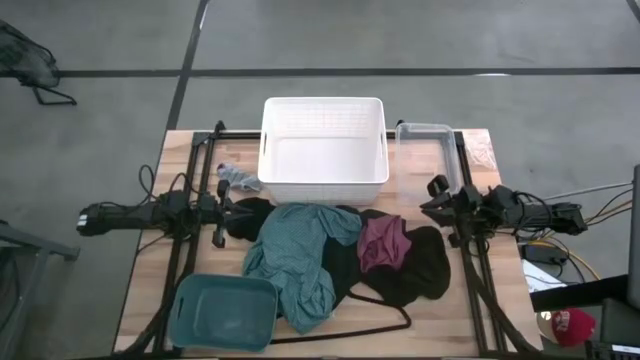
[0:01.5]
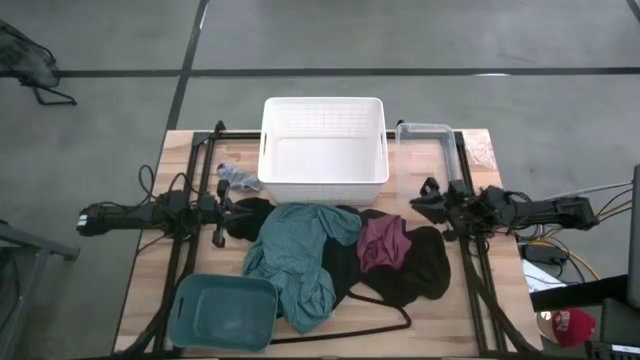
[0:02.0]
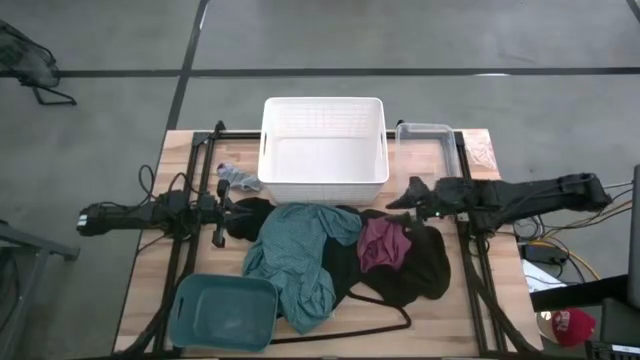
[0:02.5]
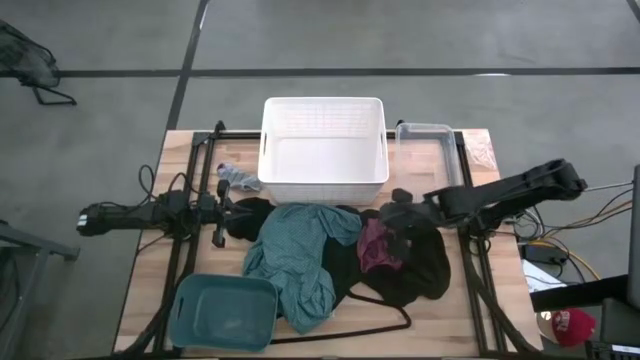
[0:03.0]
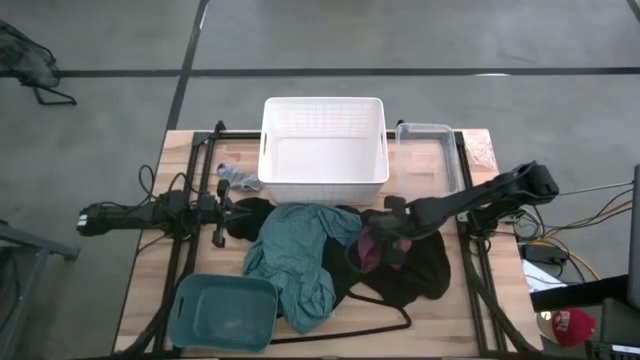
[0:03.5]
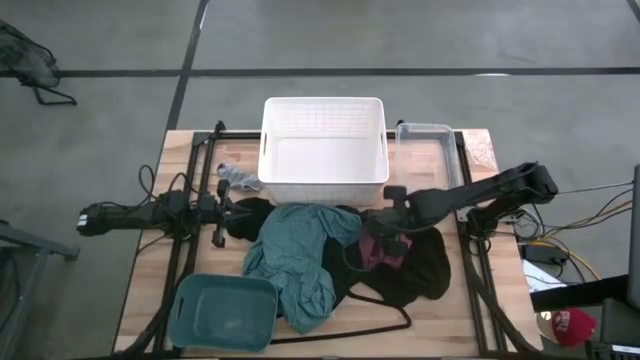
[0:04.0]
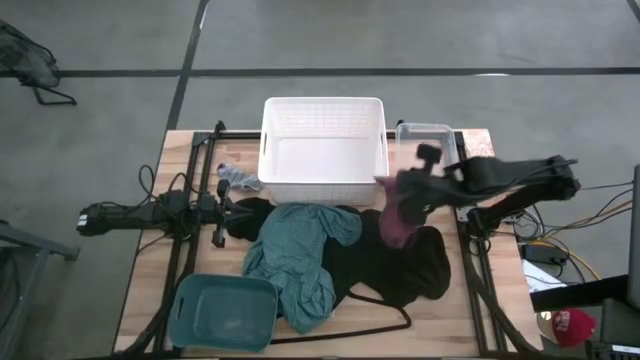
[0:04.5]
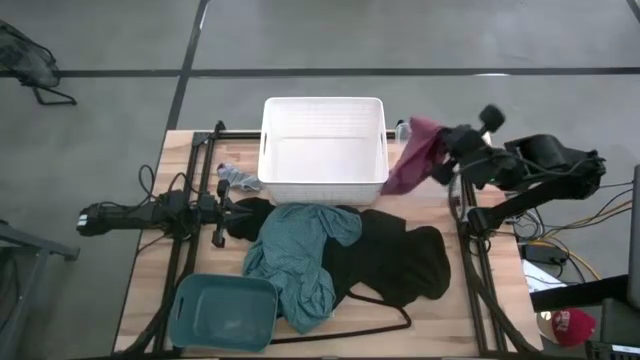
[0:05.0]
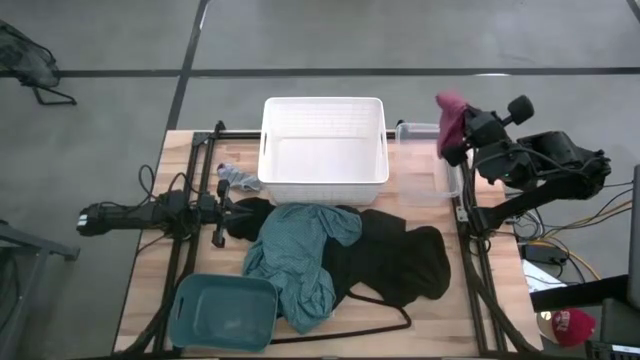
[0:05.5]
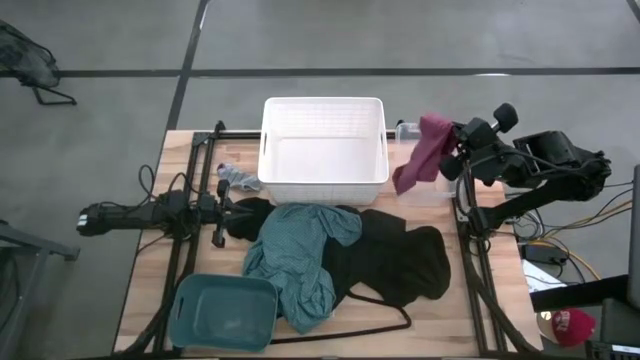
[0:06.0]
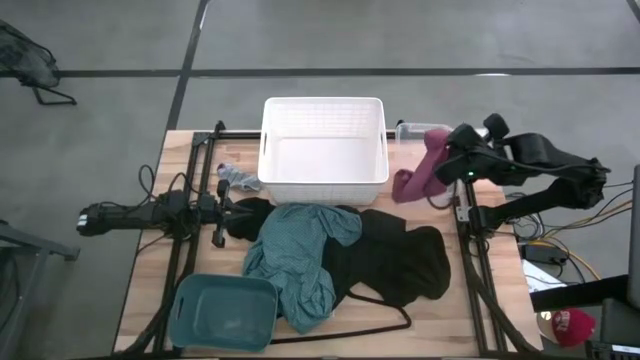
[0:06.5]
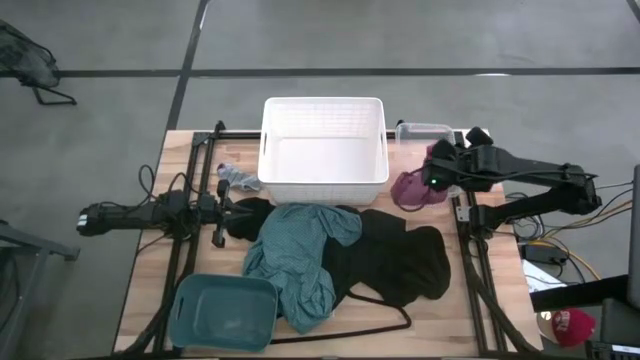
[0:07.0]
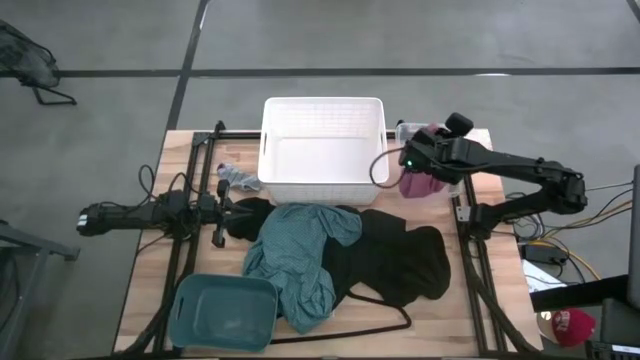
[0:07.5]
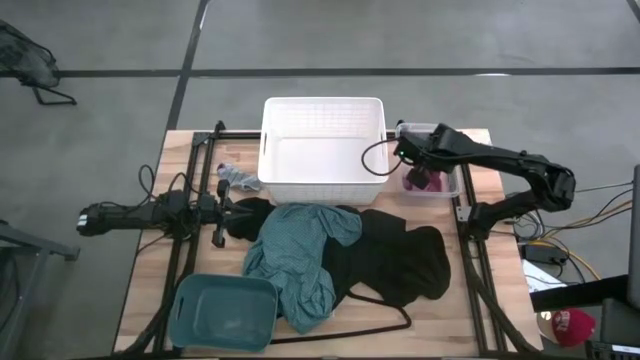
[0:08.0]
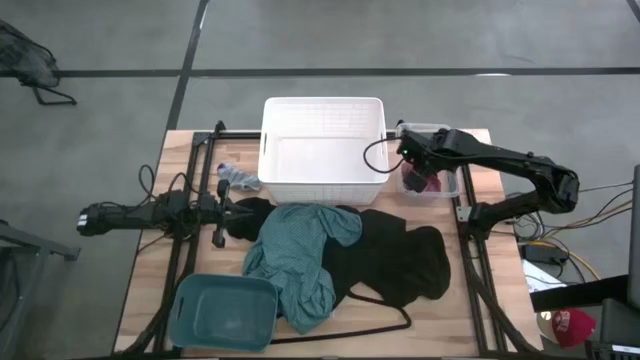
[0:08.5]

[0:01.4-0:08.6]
Task: Pick & Place Cloths
Put the dark pink boxer into the transparent bin

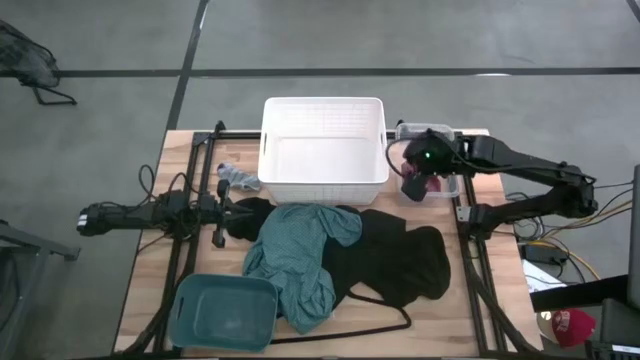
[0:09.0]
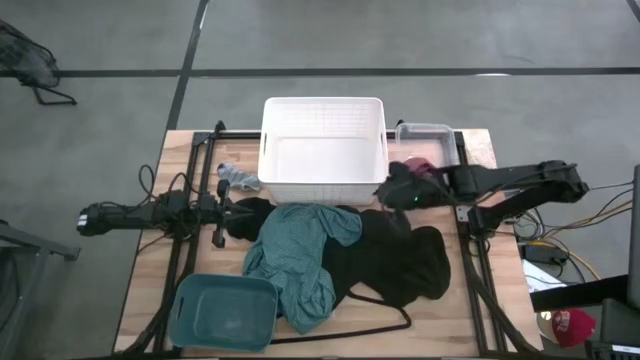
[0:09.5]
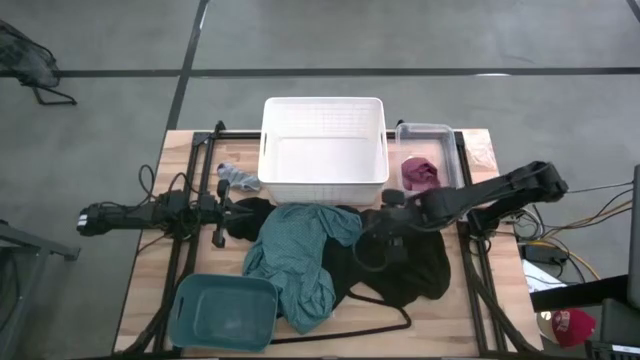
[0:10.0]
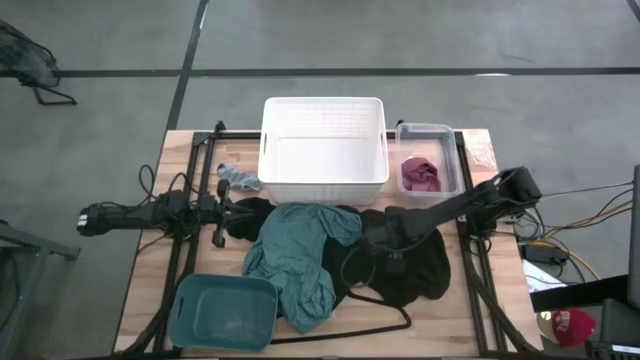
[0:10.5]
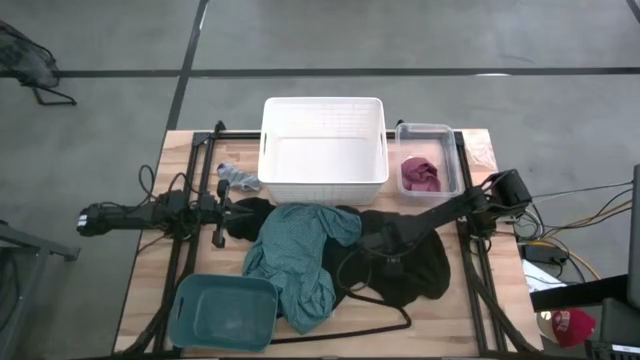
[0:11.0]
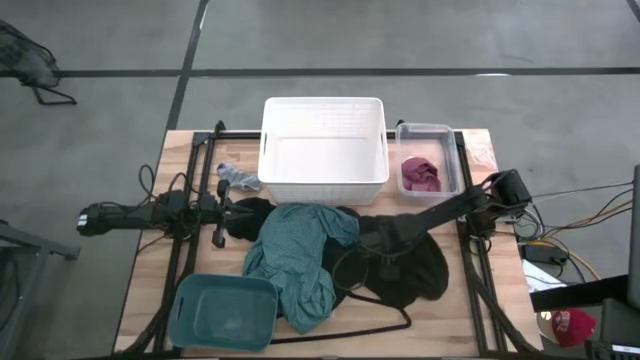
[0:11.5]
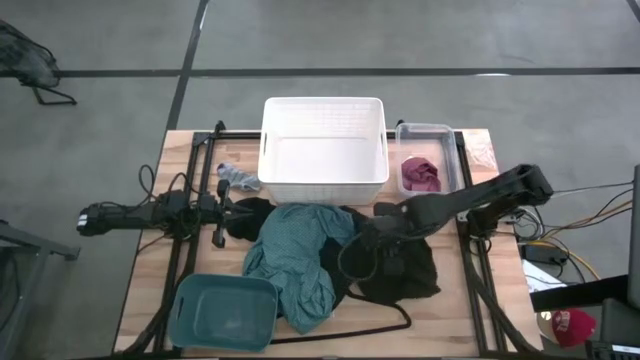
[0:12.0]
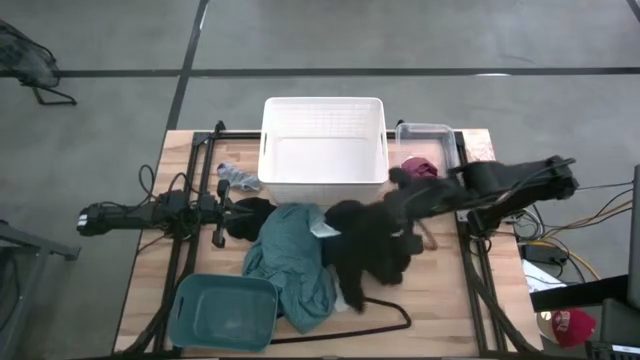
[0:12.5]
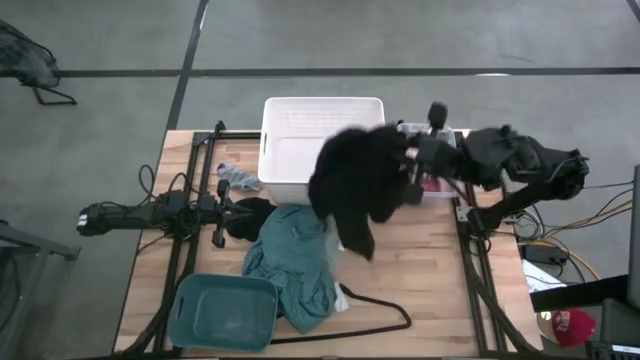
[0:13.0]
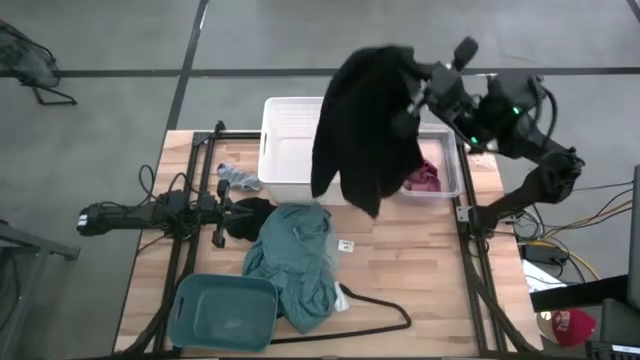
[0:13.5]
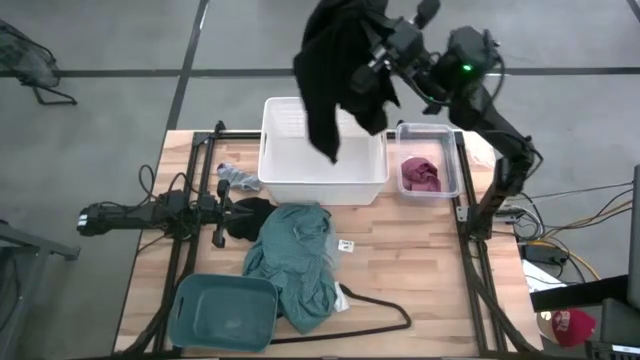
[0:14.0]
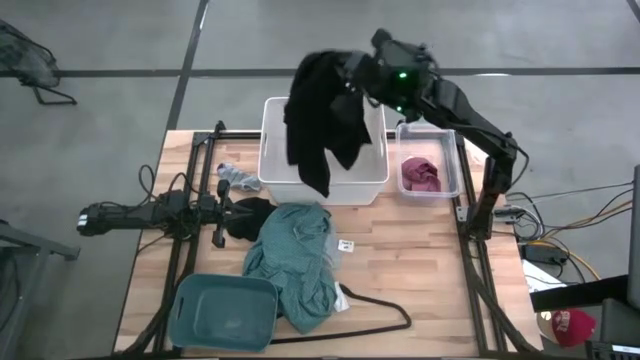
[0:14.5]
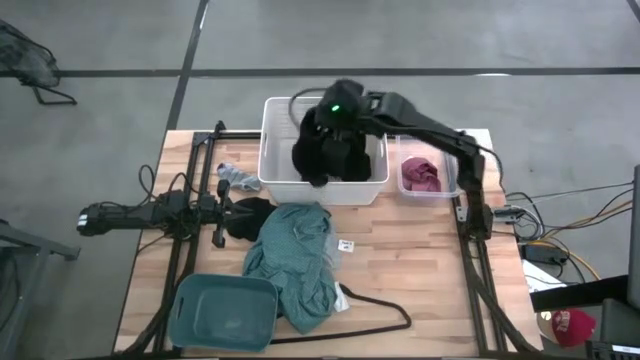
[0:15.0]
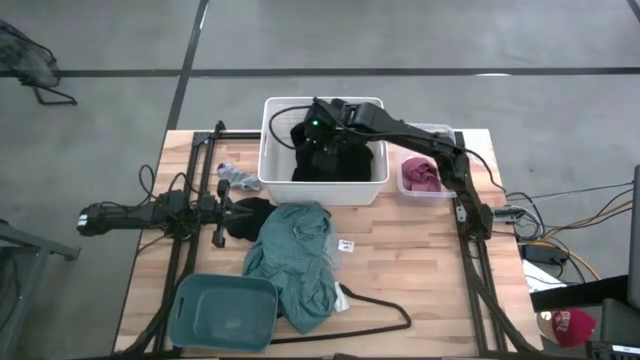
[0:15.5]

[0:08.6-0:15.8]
Put the black shirt into the white bin

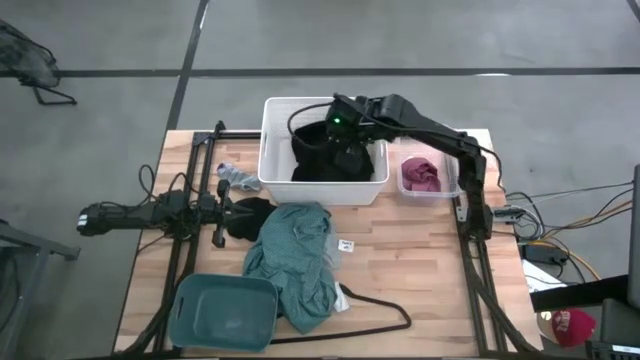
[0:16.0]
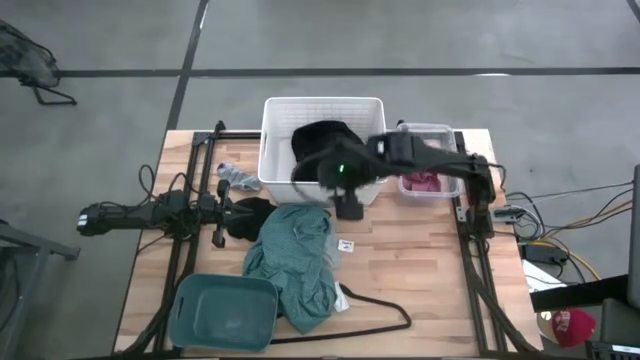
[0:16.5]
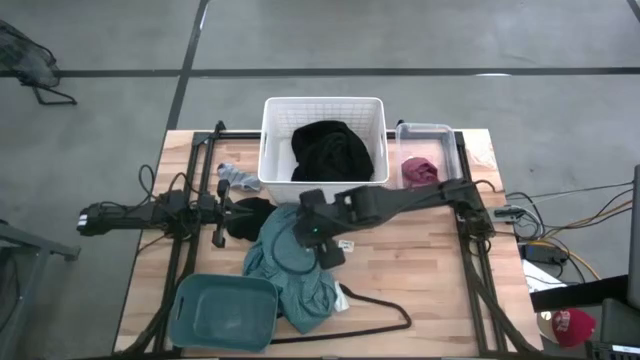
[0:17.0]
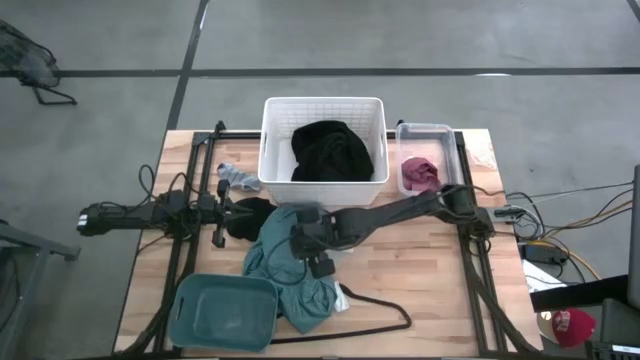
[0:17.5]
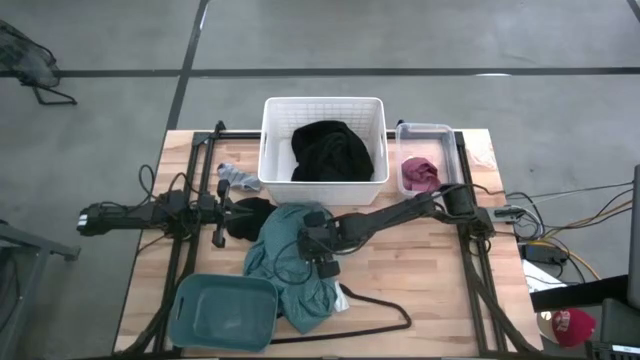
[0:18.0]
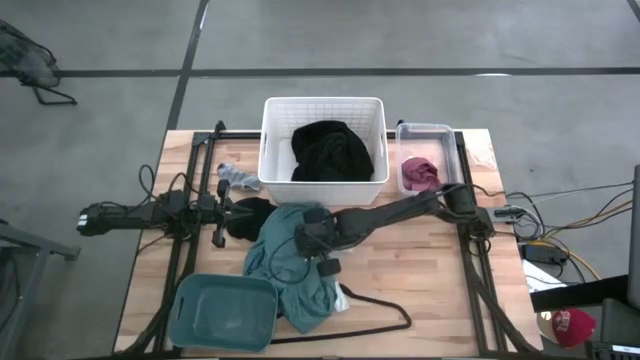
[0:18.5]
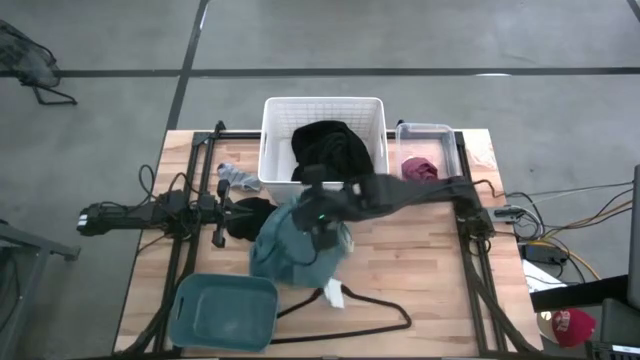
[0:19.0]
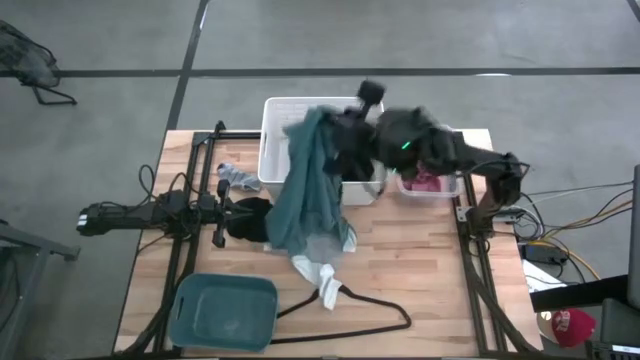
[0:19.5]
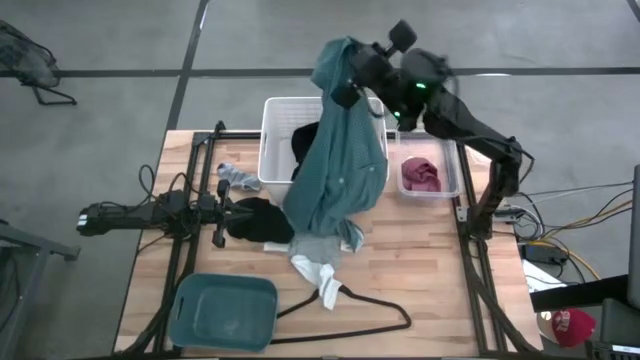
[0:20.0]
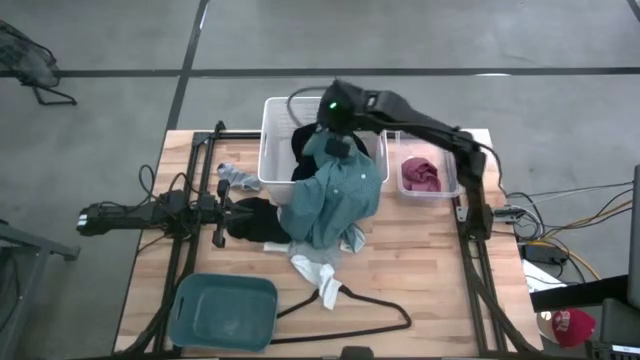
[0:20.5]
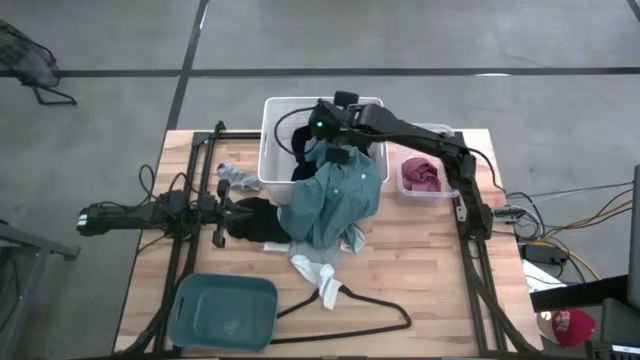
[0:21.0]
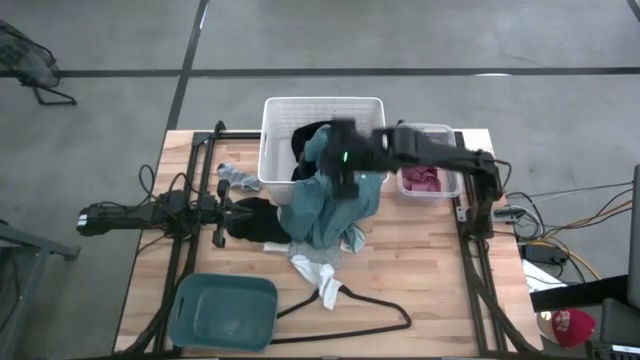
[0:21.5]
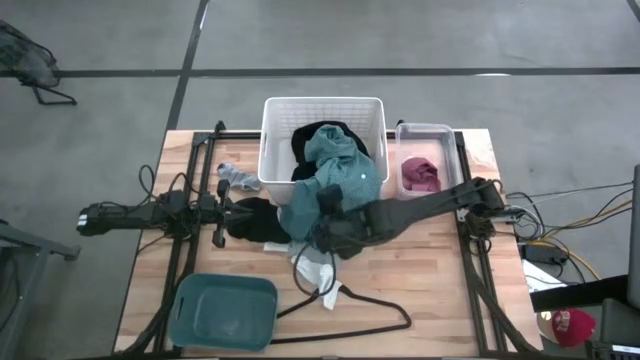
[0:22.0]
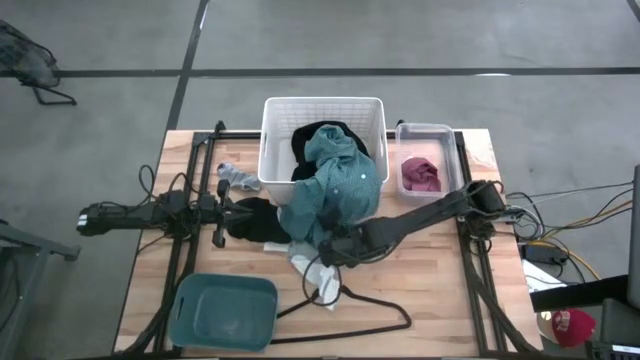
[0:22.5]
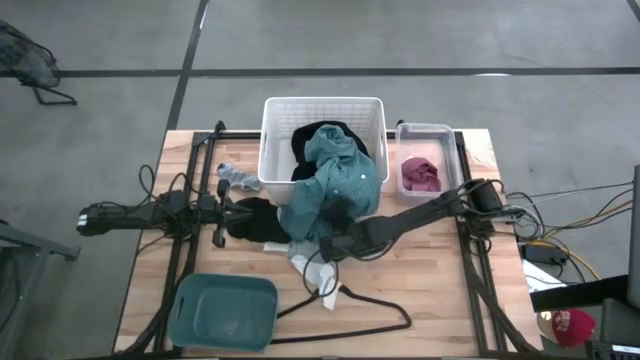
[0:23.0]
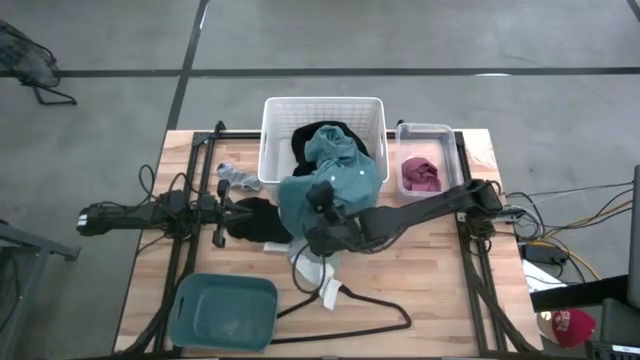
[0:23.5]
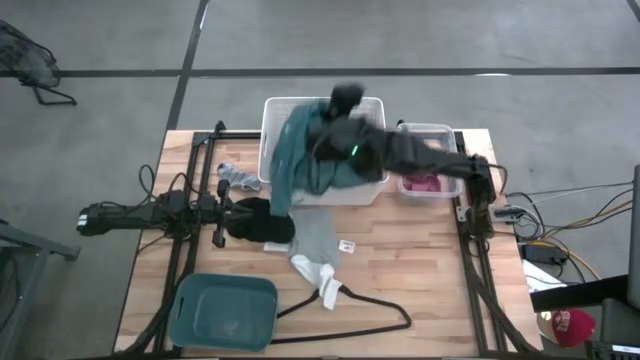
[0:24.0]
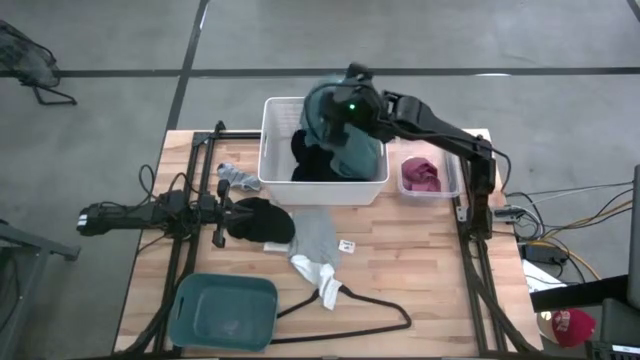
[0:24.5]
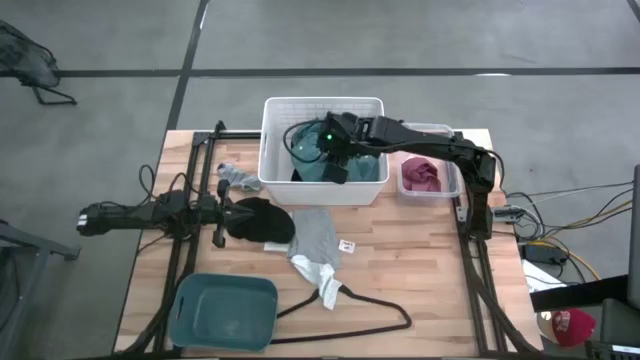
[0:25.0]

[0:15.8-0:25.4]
Put the green shirt into the white bin
